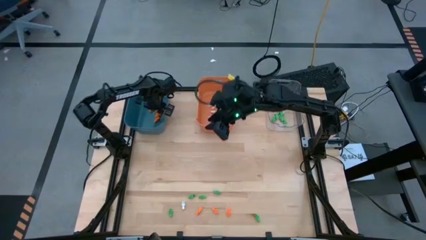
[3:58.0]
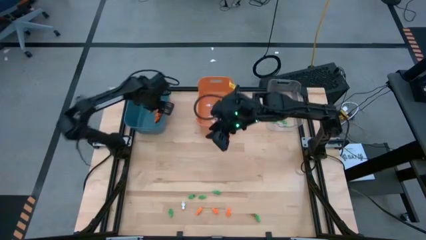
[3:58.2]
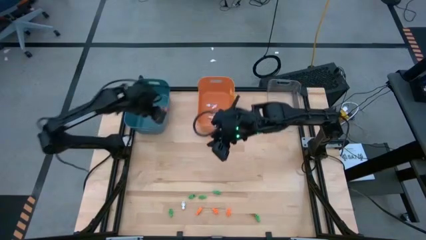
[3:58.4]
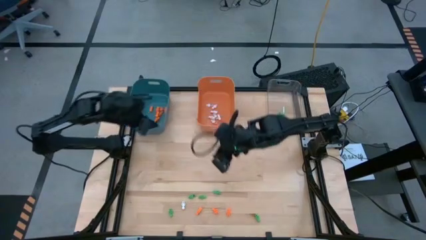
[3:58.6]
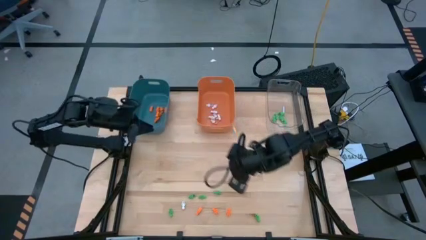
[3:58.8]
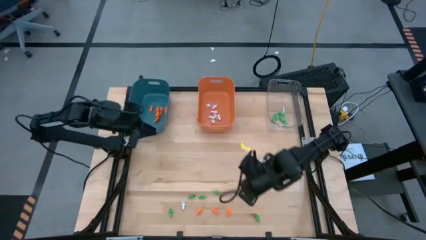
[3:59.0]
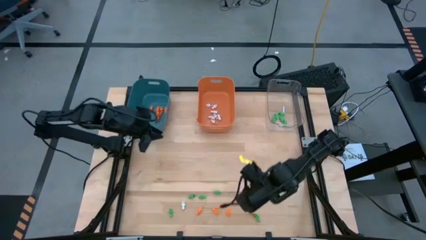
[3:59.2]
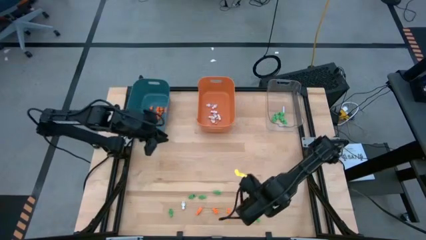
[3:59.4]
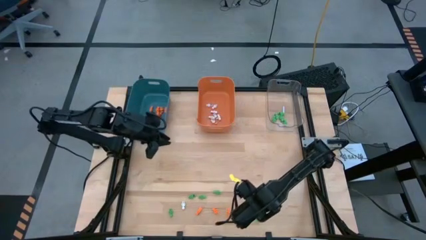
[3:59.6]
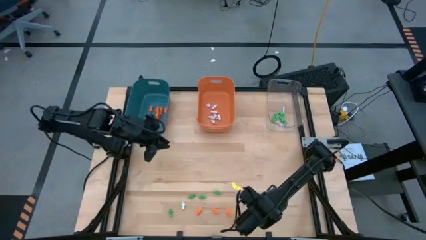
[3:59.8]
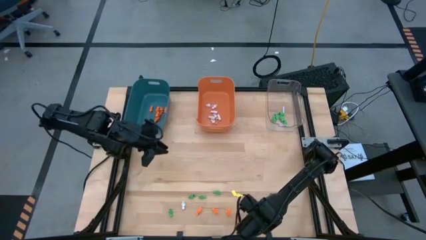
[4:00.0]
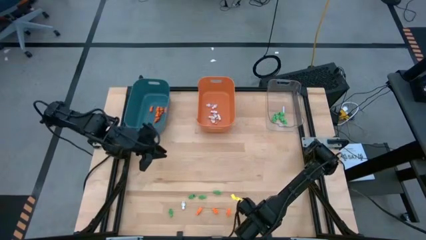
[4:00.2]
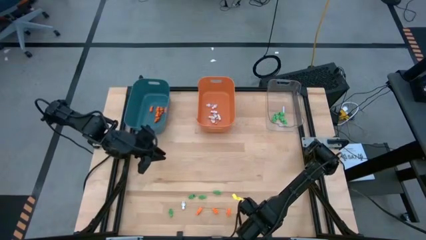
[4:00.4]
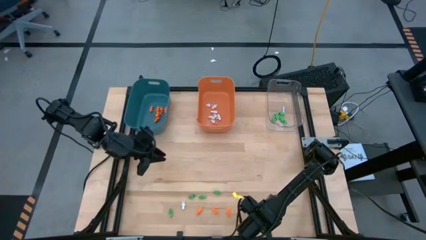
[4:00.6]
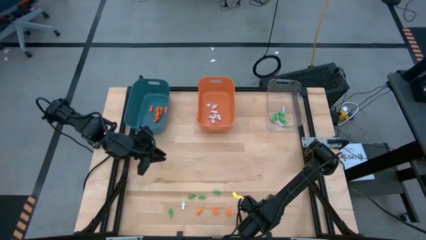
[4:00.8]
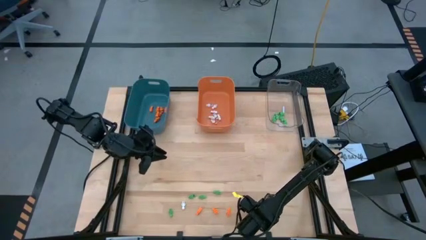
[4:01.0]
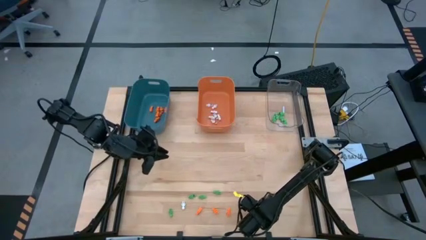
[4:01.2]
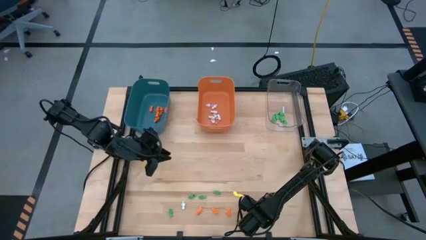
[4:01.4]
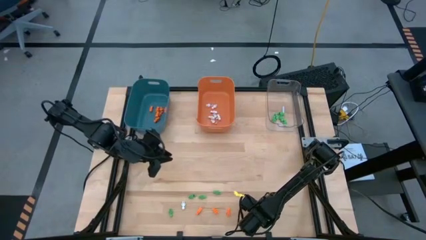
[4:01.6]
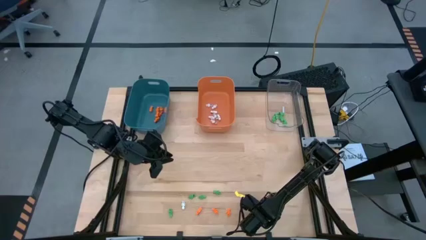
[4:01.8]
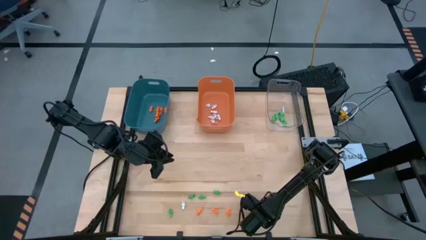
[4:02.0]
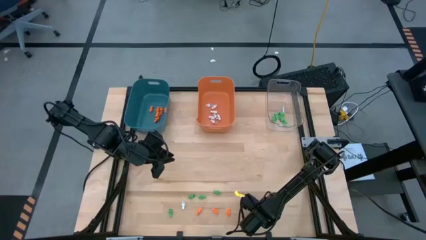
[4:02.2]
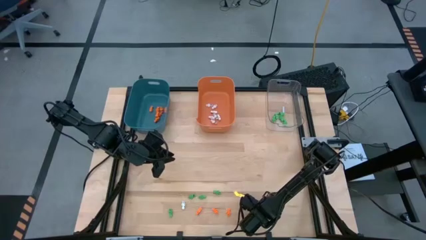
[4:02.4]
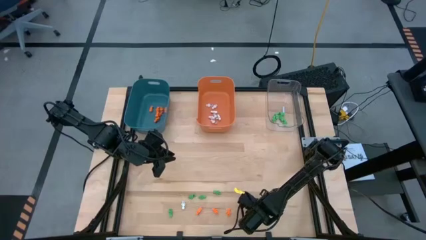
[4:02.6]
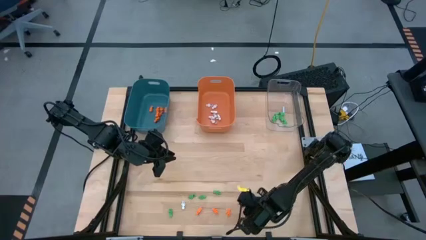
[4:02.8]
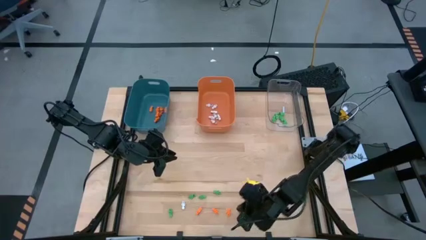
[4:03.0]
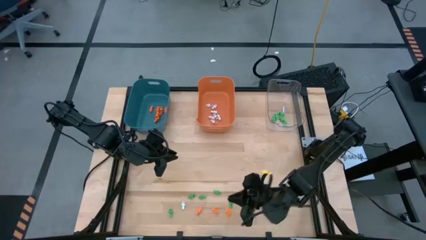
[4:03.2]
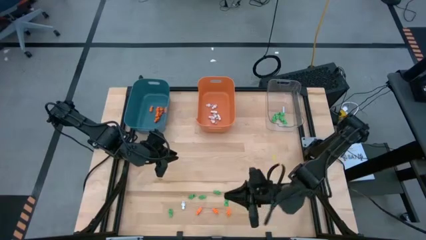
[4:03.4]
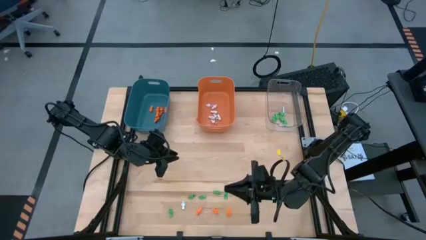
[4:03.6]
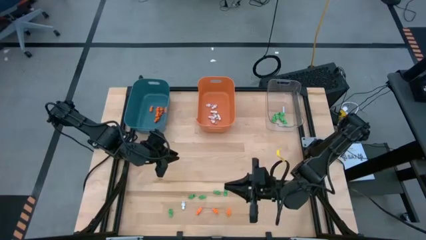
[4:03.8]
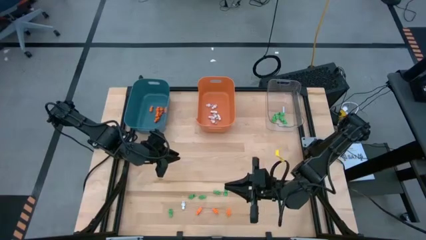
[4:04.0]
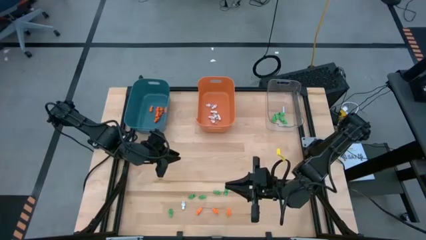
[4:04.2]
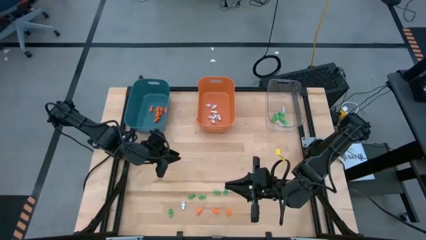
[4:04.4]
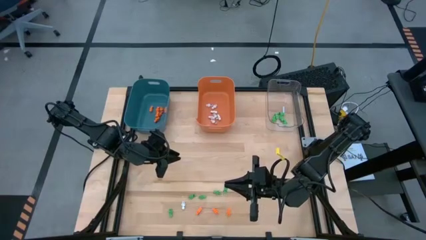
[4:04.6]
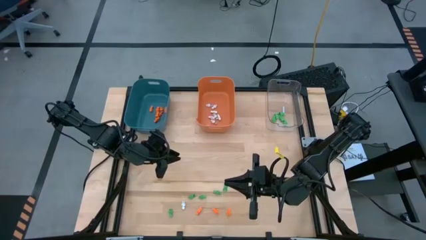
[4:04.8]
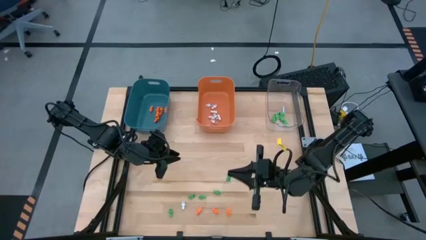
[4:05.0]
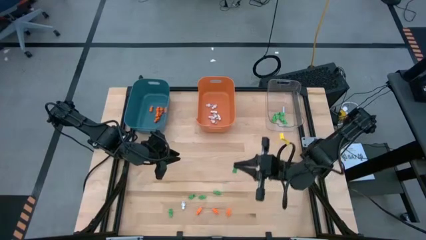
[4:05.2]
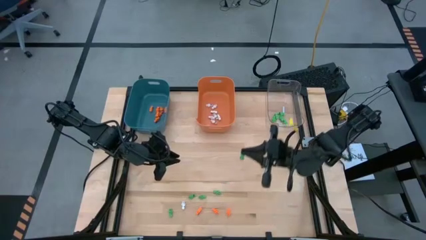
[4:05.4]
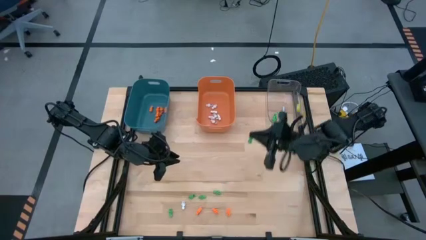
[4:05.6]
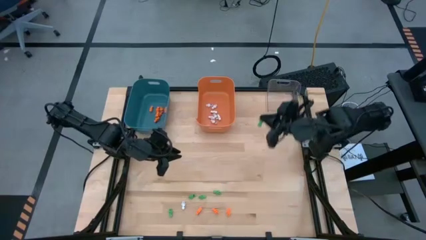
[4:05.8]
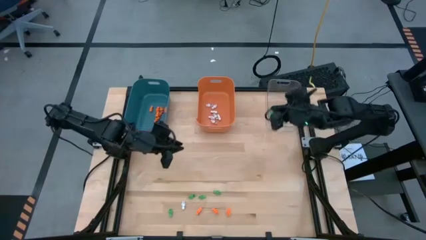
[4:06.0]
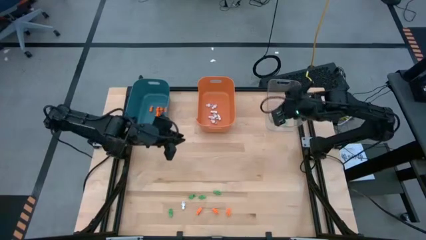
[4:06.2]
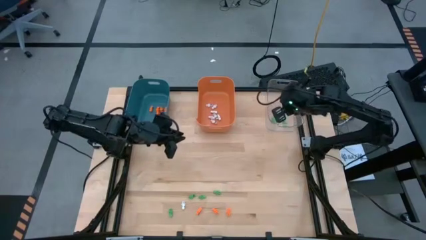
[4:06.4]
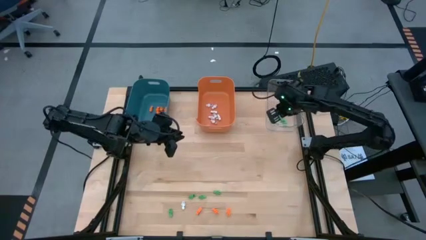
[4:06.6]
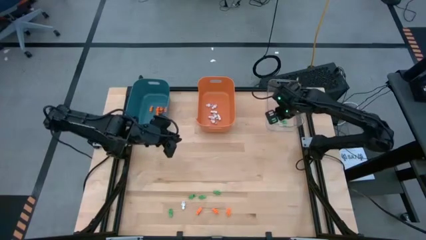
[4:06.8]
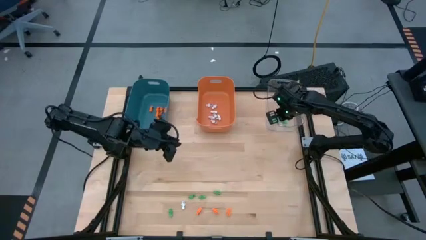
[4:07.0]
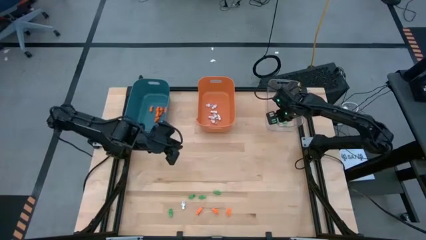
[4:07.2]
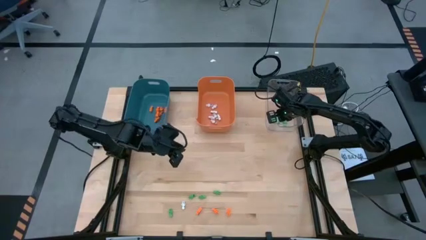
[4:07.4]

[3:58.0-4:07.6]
Task: Sort Halloween decoration
Put the green skeleton toy into the transparent bin

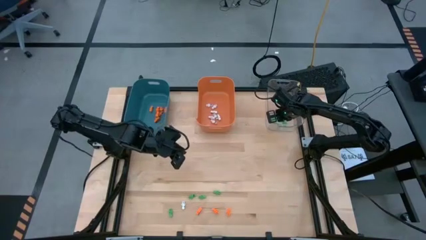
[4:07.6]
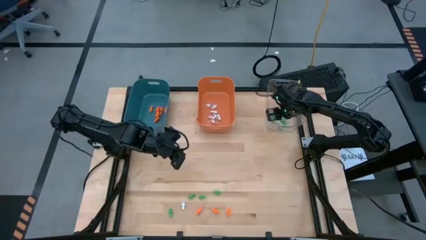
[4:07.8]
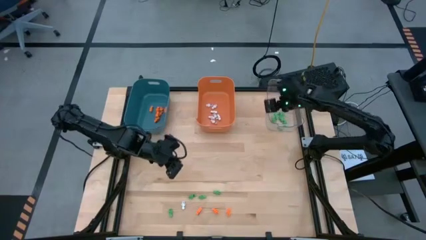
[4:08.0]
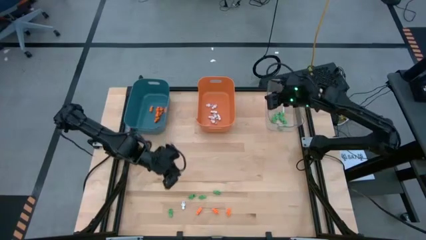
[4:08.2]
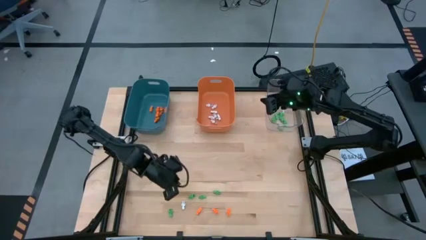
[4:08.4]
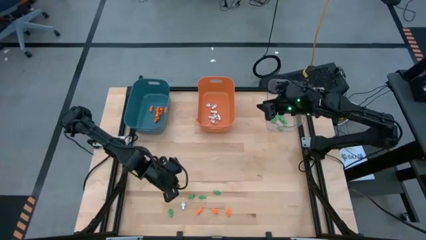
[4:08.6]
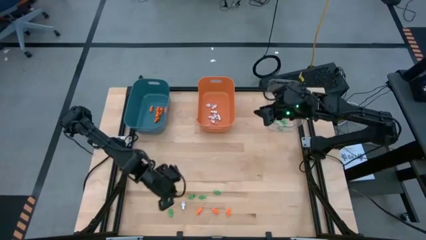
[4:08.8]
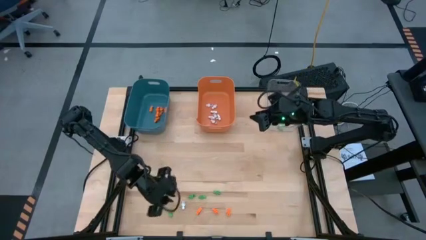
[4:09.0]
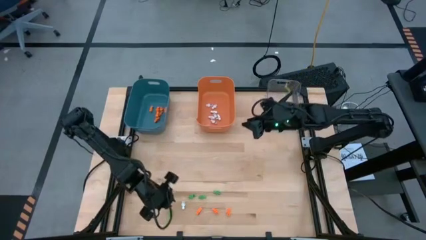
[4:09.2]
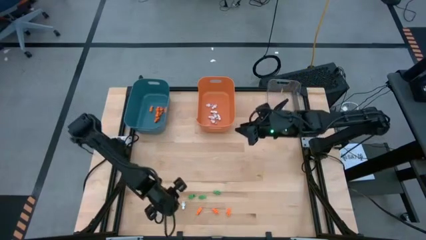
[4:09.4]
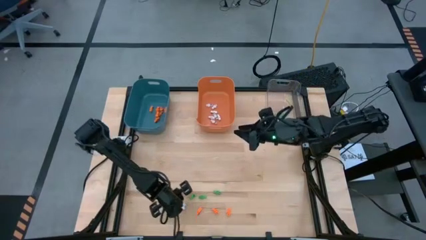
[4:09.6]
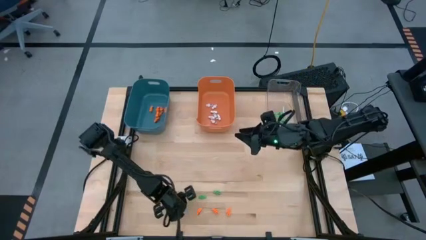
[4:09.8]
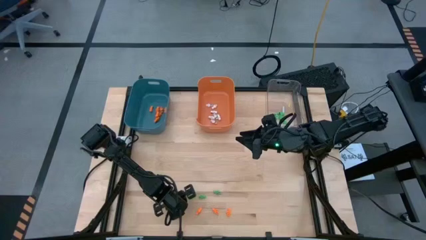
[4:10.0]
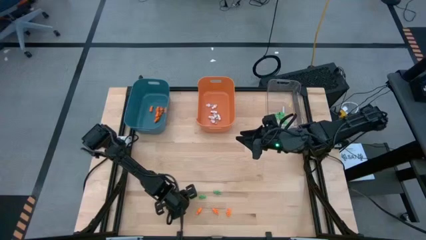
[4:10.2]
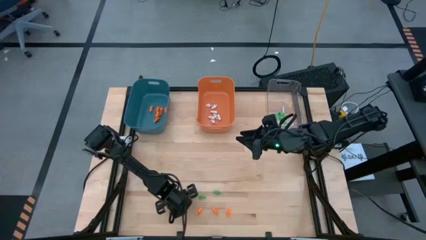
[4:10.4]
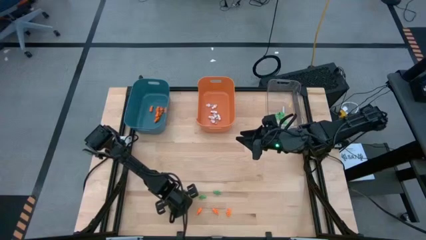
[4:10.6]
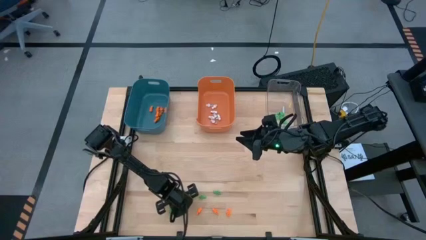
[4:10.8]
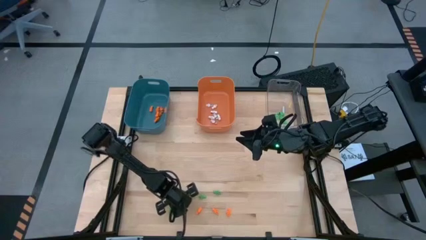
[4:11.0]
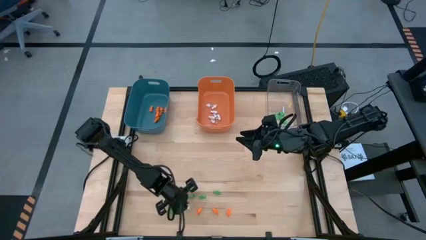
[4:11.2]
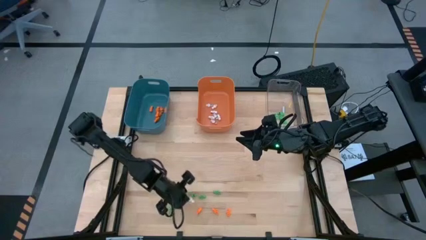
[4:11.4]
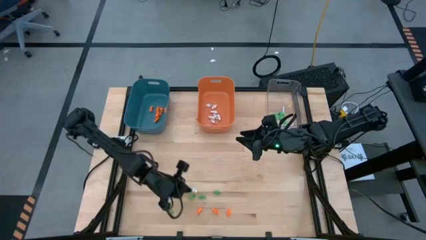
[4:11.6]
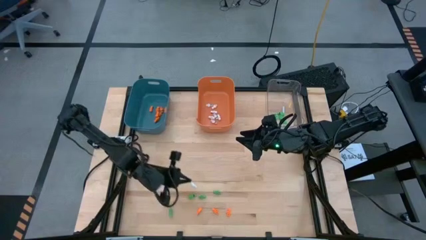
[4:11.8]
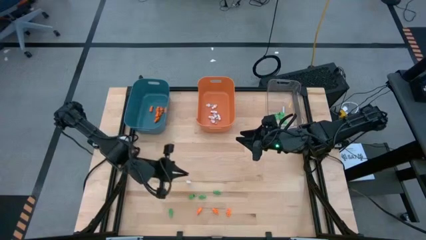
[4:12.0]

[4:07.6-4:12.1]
Put the white skeleton toy into the orange bin
